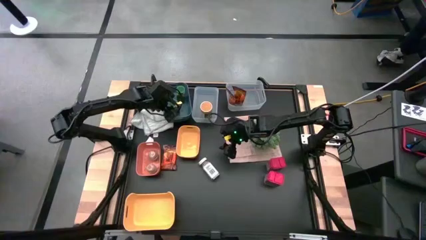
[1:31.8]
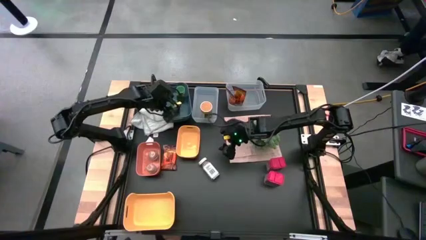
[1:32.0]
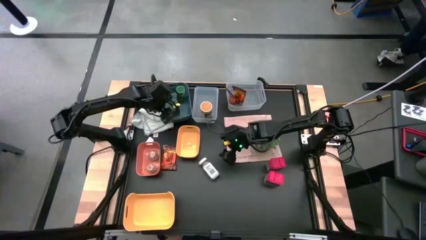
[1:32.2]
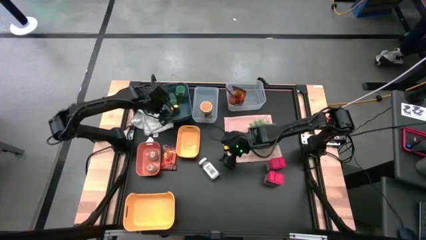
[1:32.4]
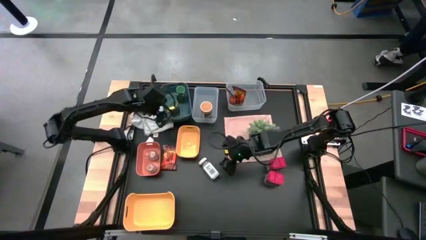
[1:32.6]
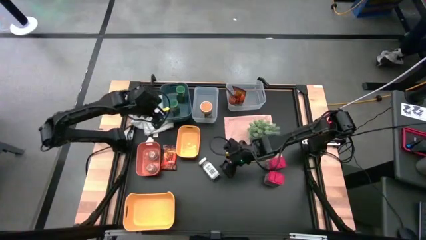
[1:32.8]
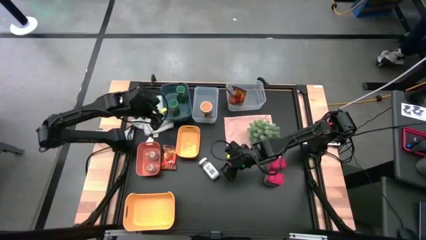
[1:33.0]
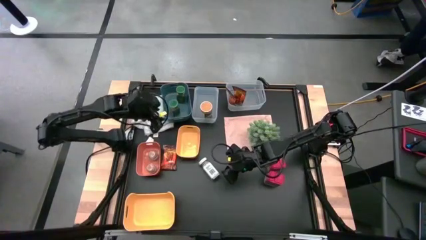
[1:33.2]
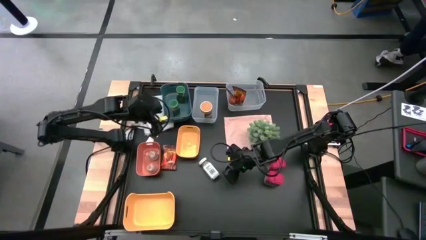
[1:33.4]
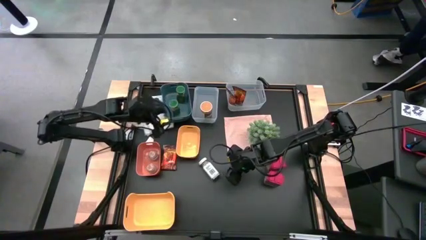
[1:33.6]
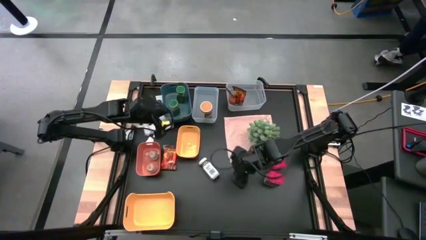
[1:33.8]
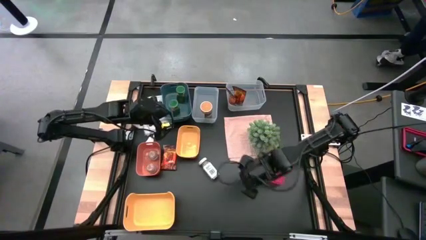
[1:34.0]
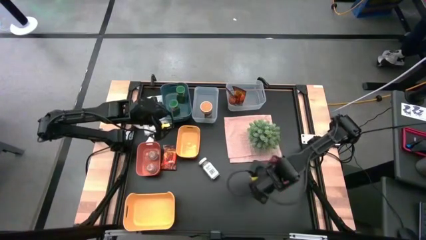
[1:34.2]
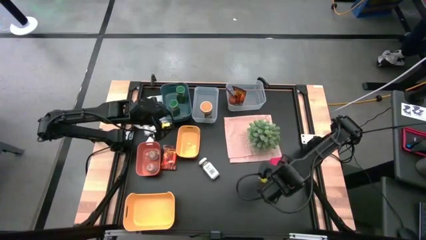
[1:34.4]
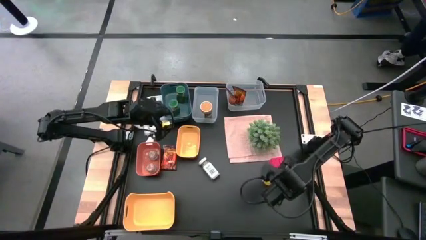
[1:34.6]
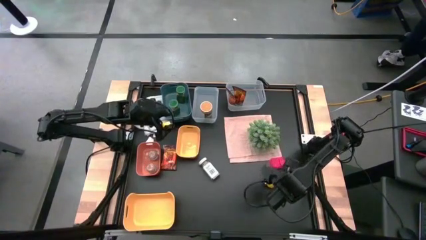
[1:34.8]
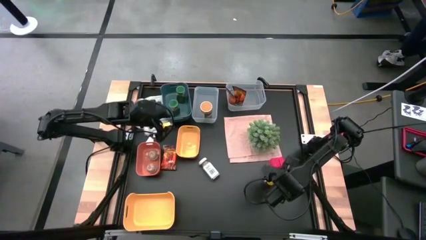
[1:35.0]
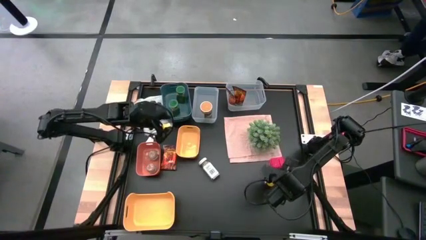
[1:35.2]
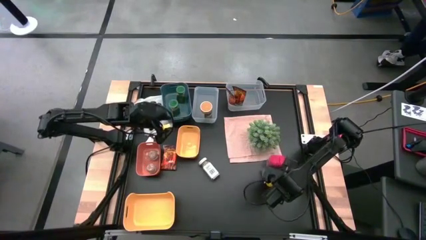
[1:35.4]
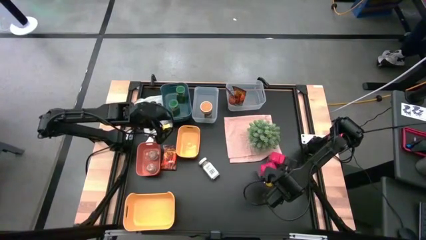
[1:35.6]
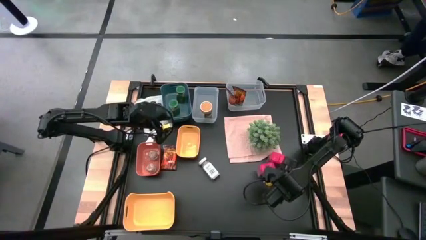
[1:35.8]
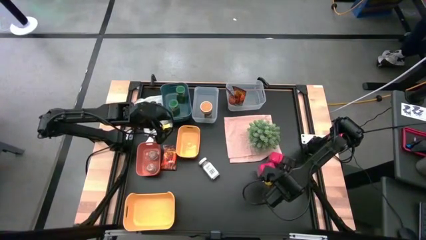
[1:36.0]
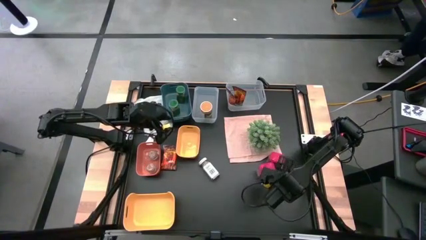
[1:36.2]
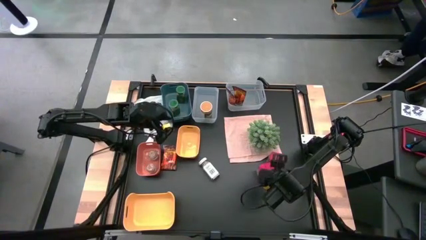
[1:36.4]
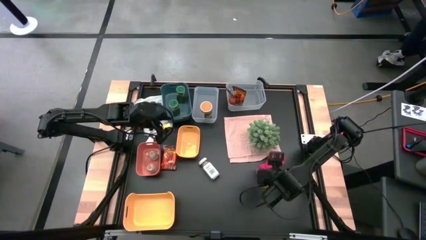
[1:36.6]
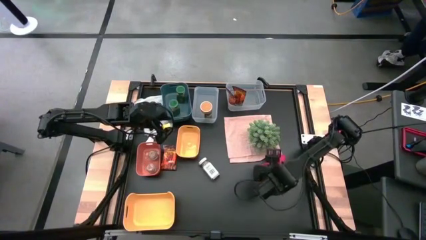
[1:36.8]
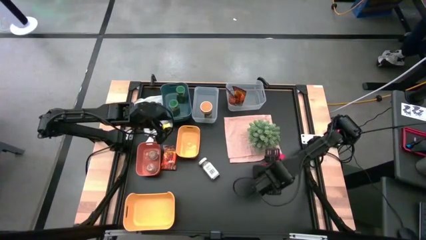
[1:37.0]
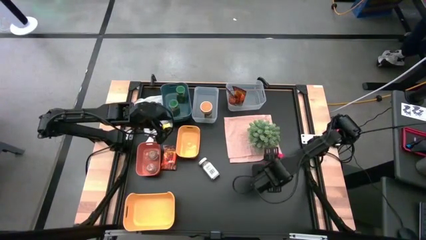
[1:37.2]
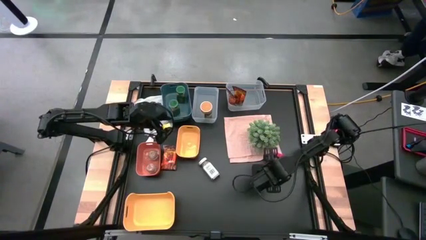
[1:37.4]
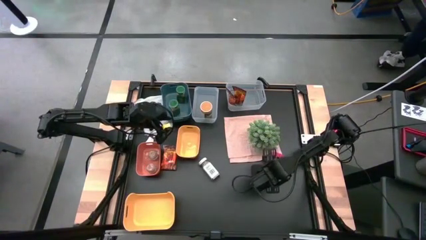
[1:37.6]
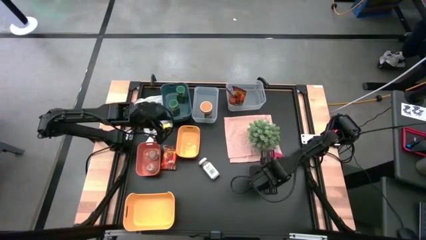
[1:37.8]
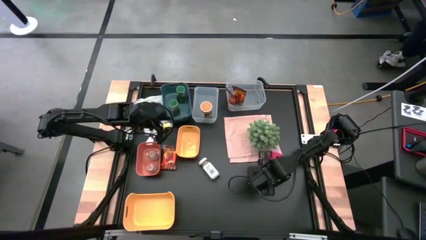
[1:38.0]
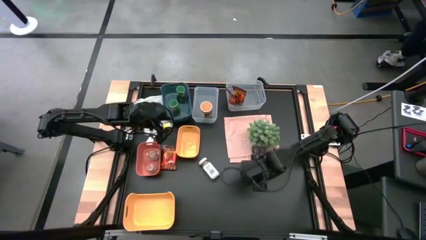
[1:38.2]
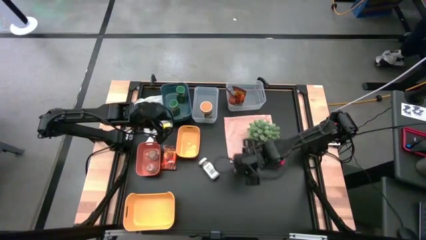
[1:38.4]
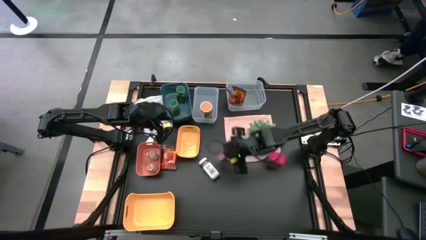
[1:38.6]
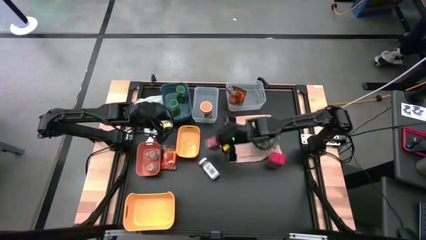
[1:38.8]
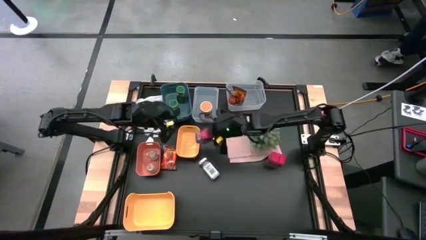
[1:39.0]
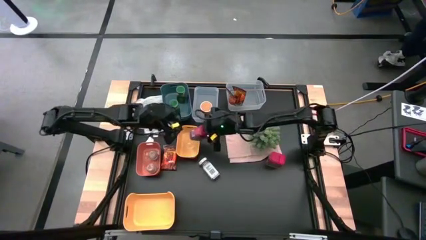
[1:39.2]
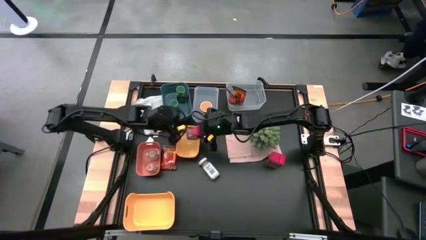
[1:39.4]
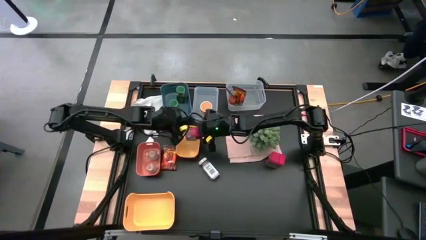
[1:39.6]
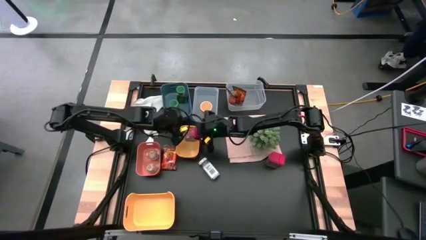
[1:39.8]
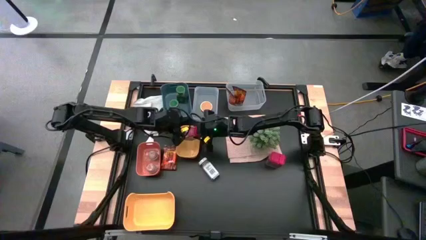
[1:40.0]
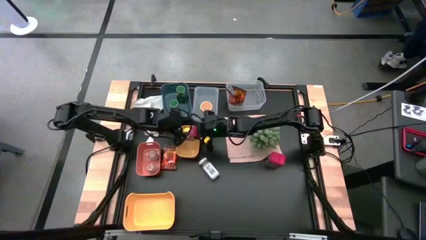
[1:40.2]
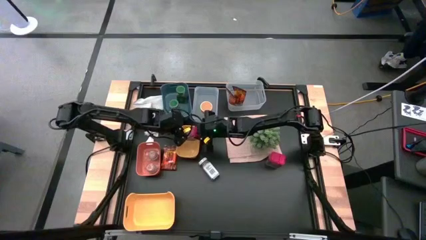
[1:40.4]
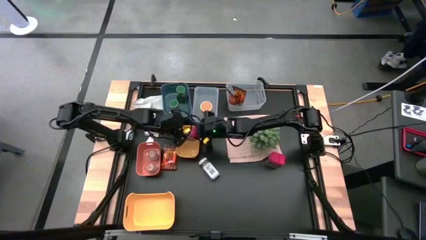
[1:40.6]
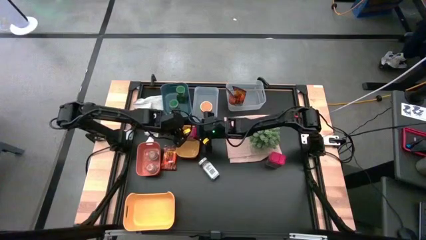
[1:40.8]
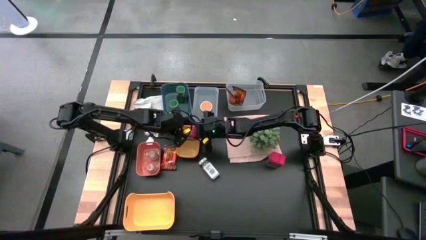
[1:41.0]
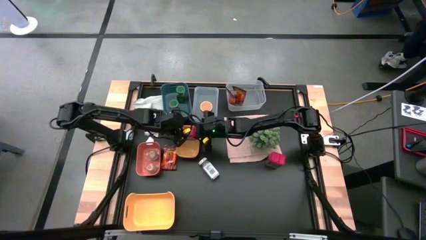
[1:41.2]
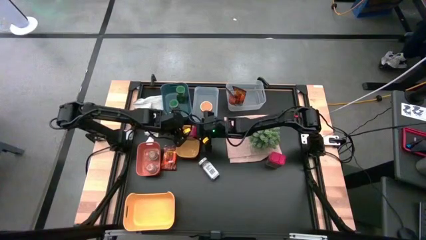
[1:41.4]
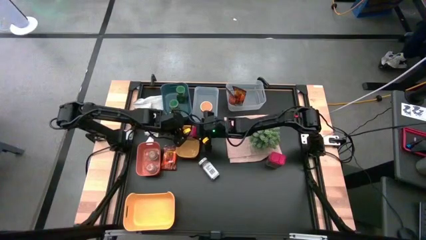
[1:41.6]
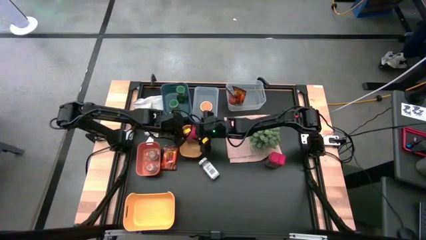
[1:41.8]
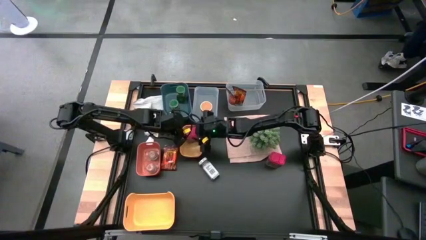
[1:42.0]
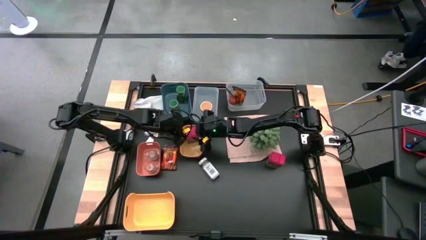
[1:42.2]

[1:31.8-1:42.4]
Task: Sort spices by type
Put the bottom red seasoning can into the top yellow bin

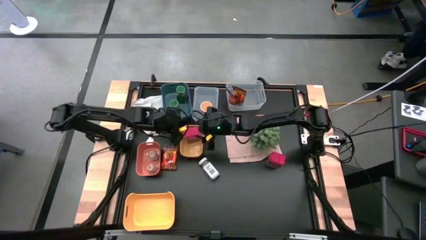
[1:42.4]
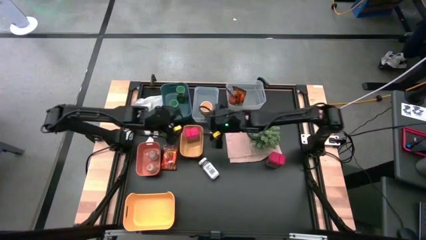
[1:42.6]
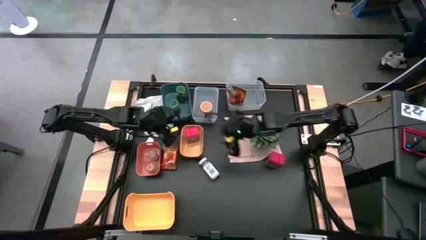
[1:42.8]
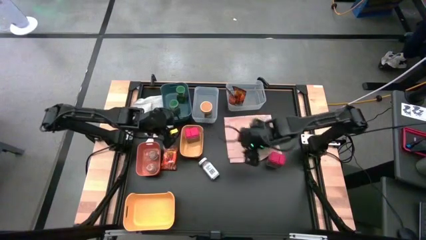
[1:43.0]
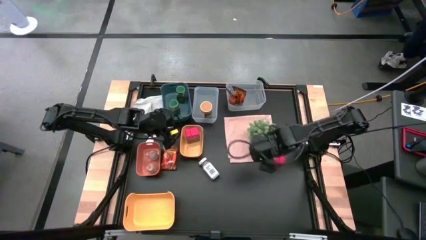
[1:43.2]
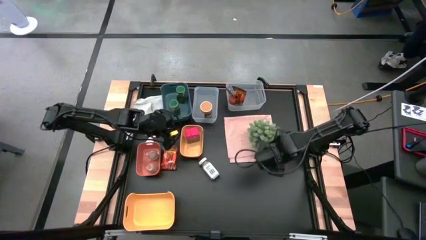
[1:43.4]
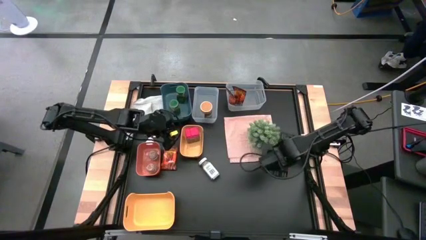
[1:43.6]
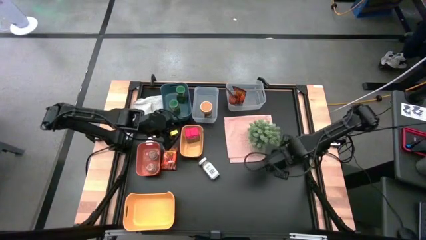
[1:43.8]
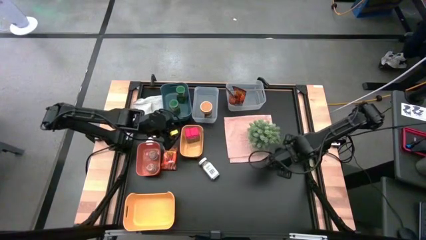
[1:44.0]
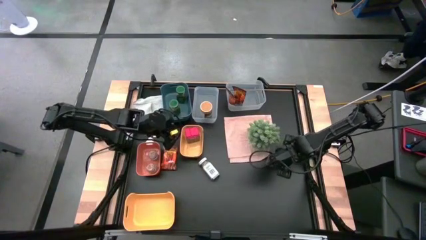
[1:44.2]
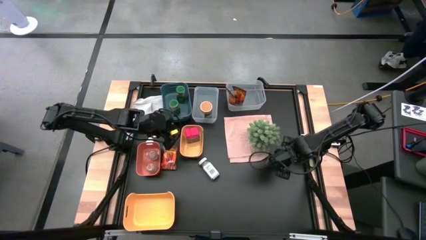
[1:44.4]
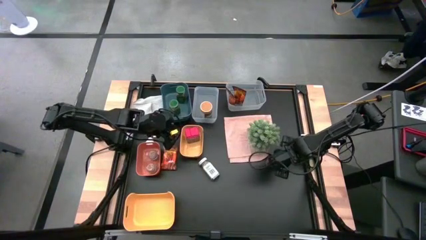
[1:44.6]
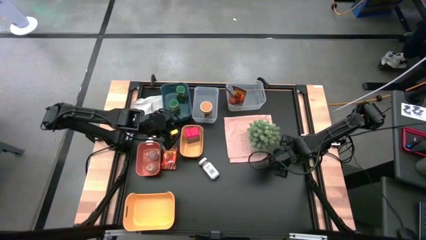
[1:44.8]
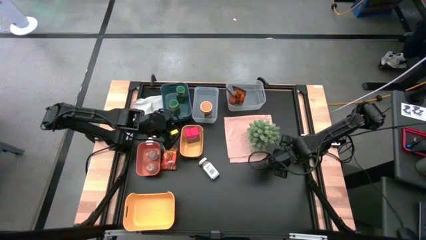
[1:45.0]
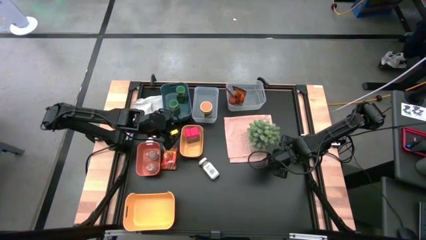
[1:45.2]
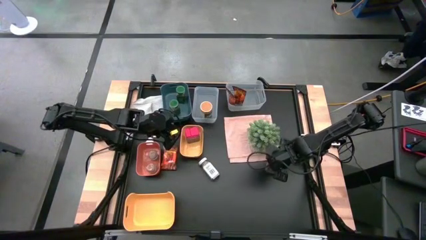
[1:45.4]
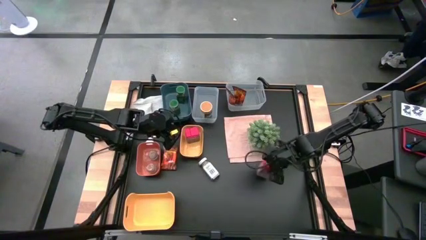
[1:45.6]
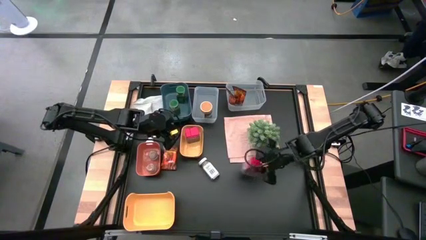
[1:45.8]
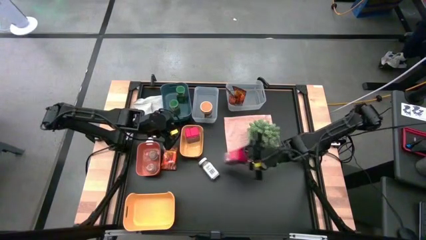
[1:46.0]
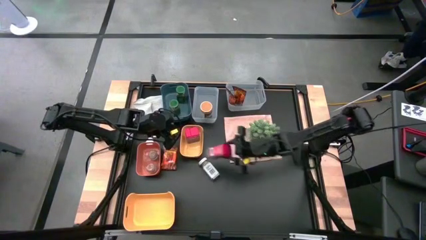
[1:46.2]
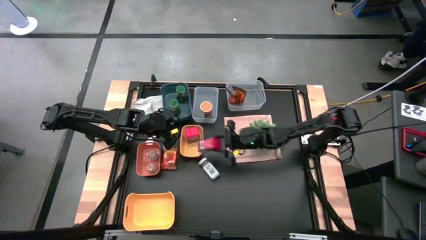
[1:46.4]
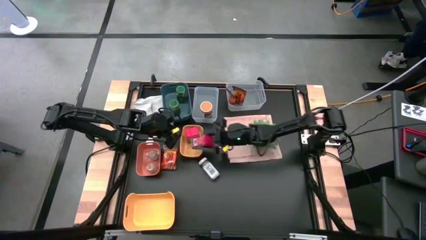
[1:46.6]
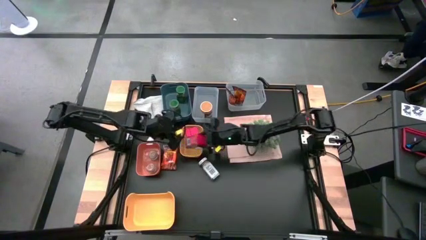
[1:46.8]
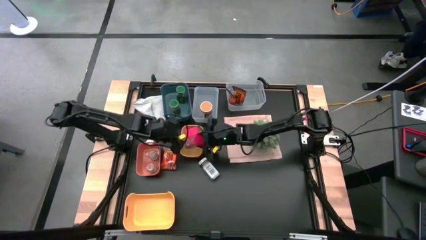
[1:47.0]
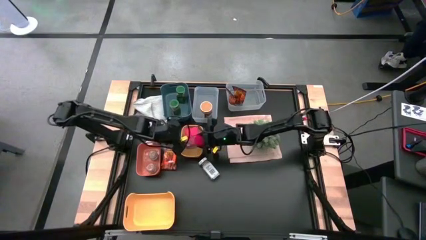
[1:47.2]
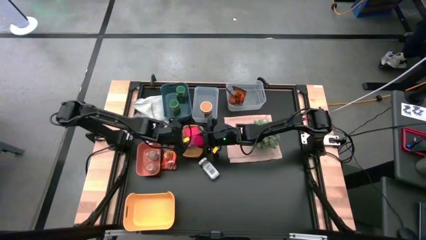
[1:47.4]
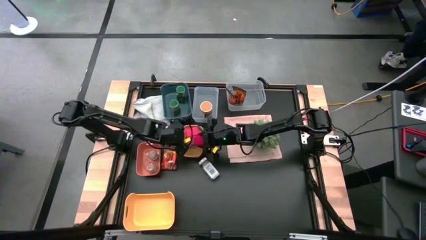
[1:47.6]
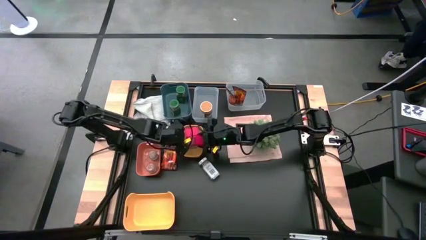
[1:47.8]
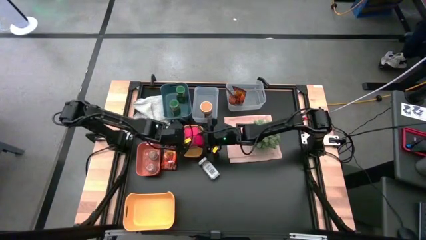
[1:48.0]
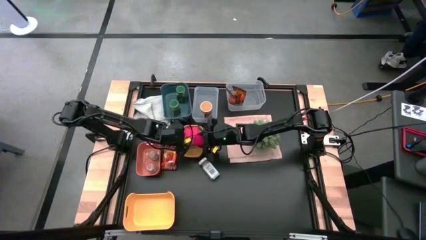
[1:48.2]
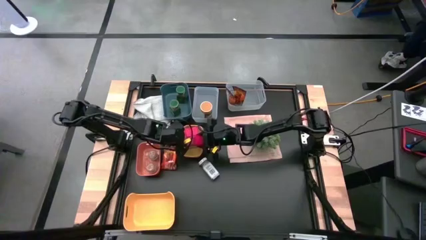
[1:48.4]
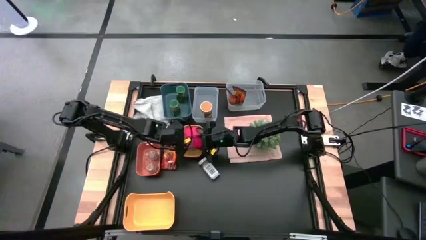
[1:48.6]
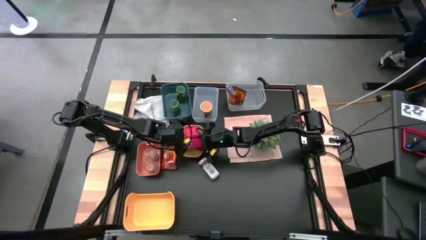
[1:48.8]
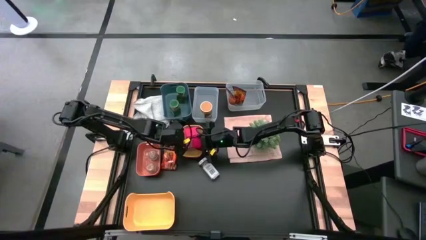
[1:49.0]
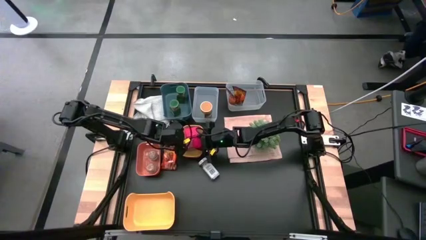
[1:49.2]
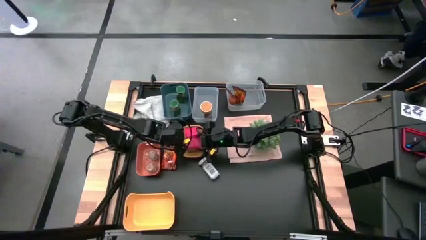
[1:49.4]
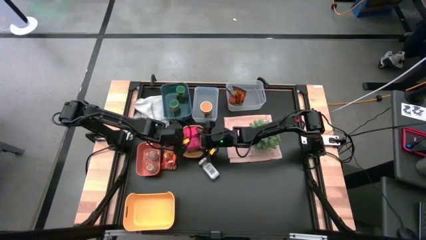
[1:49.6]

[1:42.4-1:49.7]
Put the red seasoning can into the top yellow bin
